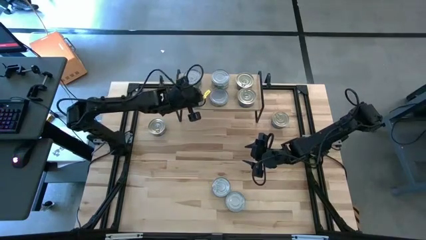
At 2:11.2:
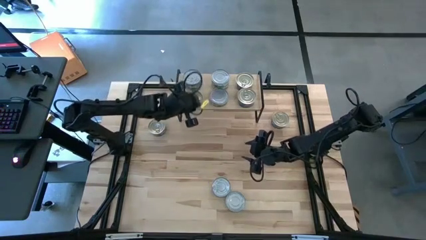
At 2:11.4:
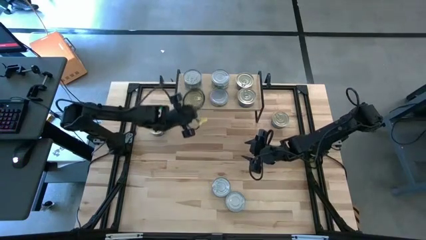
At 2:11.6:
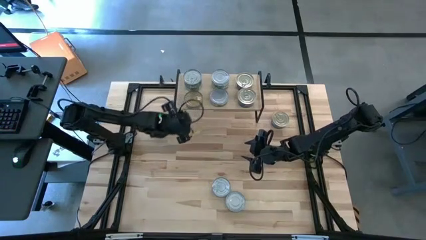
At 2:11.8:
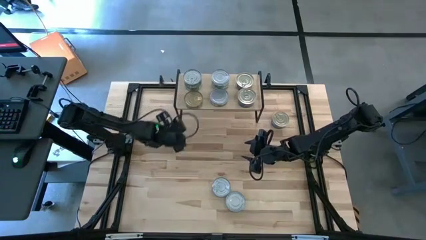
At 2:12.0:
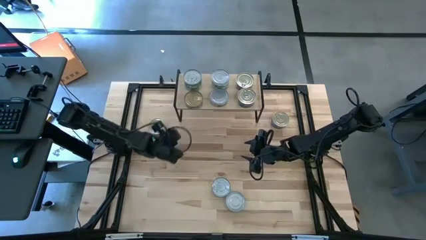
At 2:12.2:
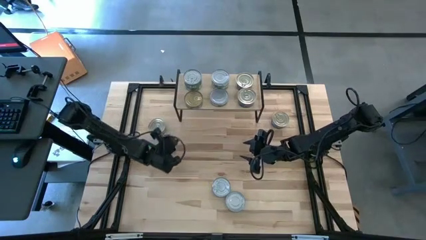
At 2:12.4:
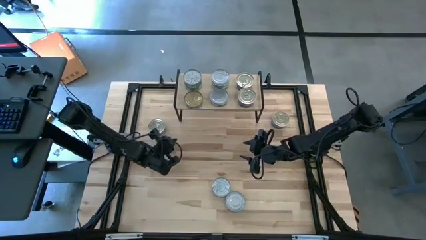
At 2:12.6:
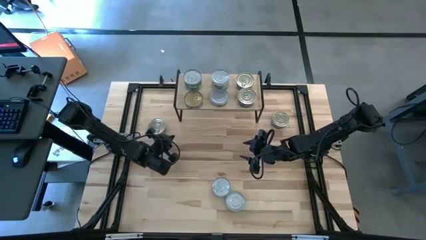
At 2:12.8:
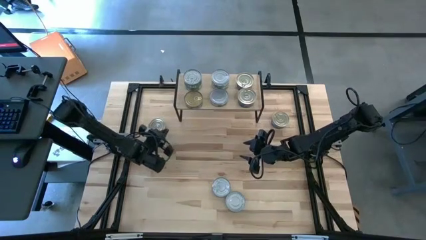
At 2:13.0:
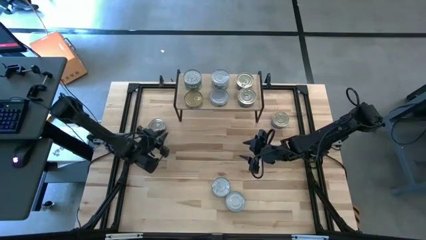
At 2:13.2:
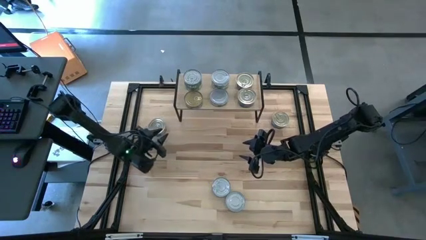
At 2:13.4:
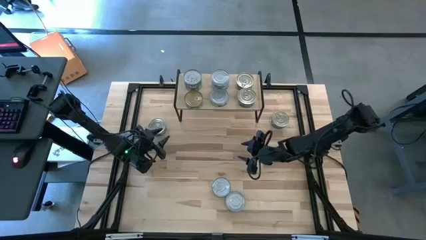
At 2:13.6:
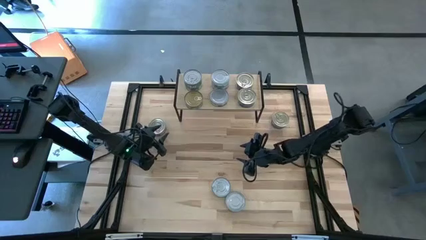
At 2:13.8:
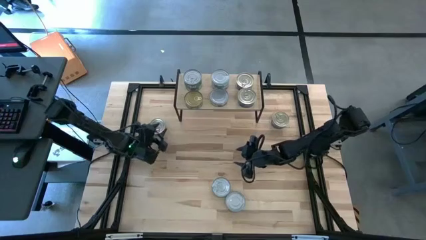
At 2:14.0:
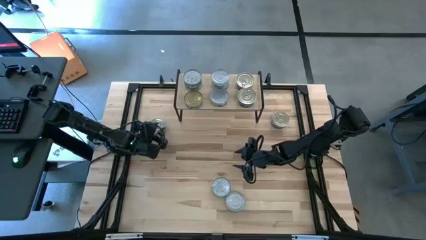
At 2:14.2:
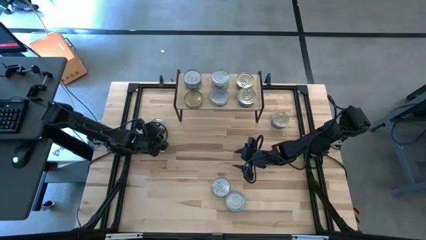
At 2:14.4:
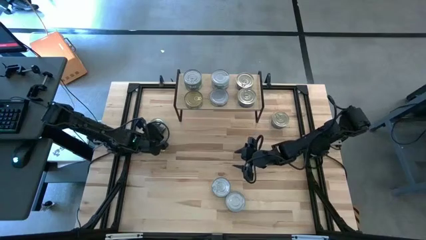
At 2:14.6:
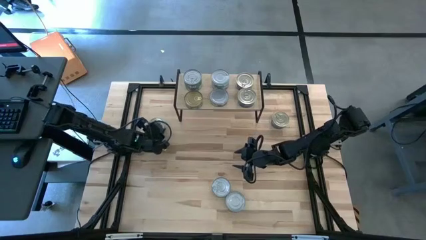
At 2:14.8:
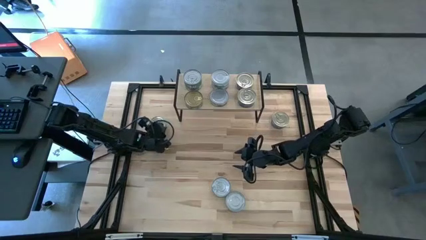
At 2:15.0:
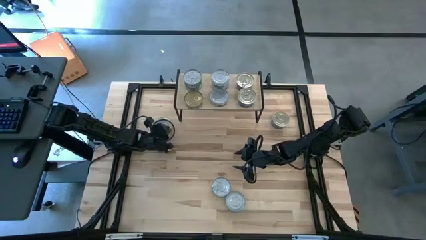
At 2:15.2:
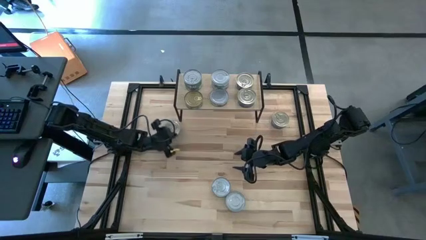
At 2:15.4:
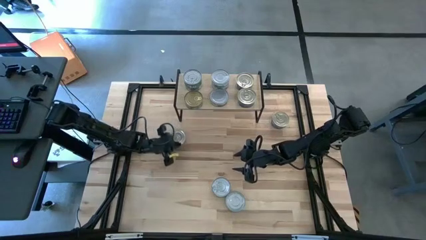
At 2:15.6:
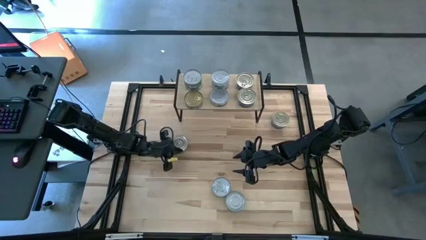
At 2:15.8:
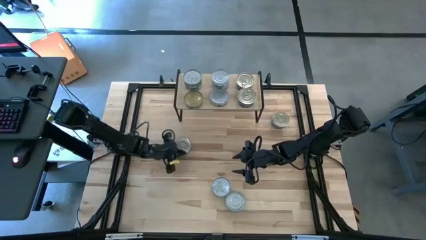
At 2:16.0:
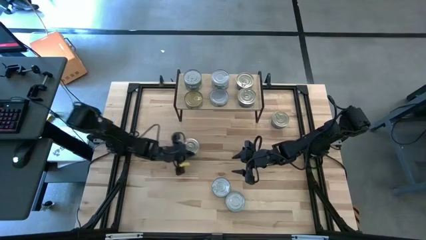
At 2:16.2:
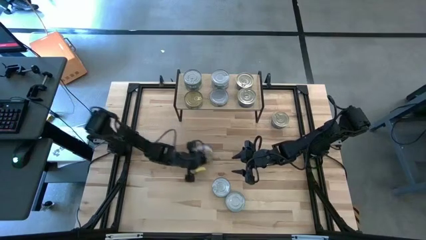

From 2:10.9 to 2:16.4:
Task: Stack canned seafood by type on shelf
Stack the left blue tuna can on top of the top blue tuna can on the shelf

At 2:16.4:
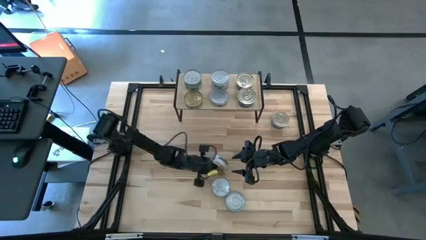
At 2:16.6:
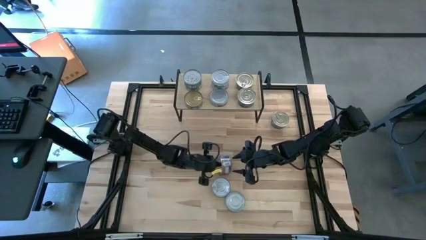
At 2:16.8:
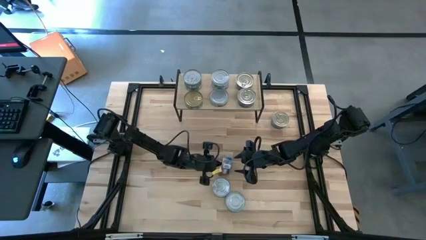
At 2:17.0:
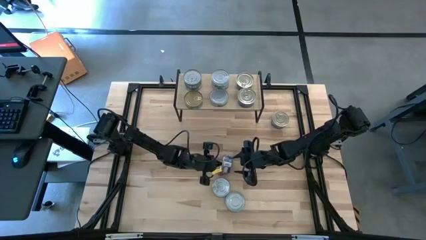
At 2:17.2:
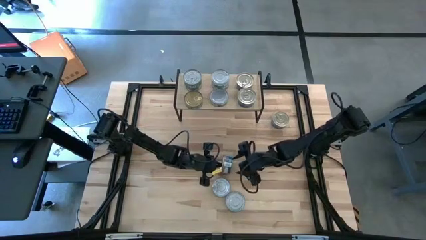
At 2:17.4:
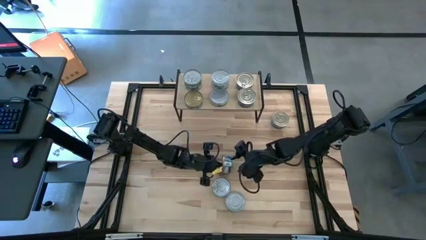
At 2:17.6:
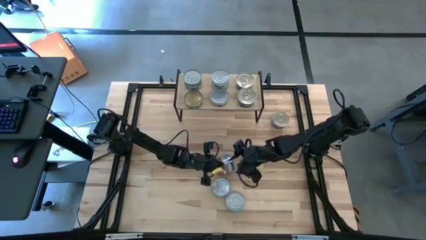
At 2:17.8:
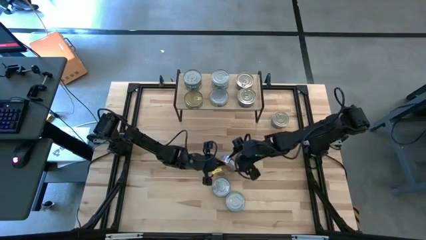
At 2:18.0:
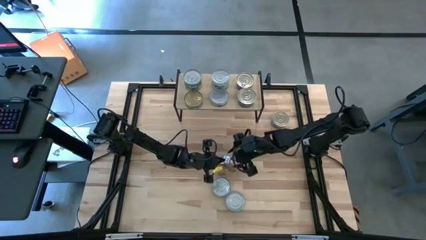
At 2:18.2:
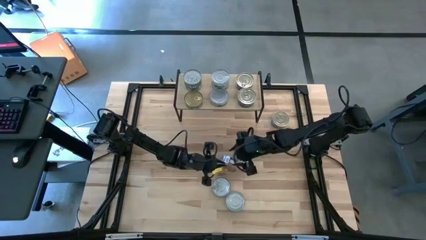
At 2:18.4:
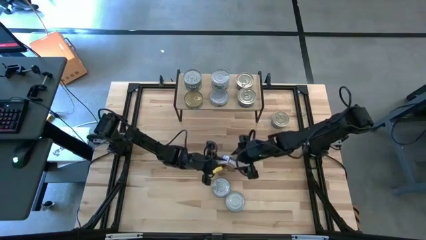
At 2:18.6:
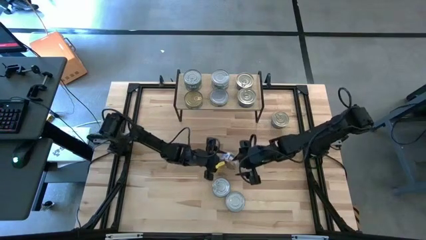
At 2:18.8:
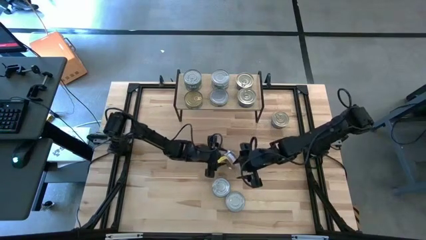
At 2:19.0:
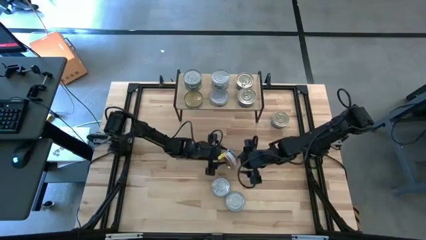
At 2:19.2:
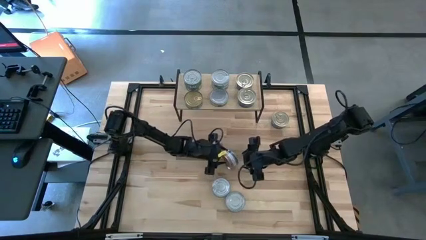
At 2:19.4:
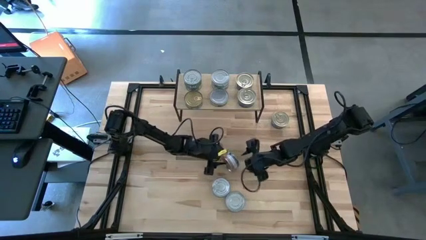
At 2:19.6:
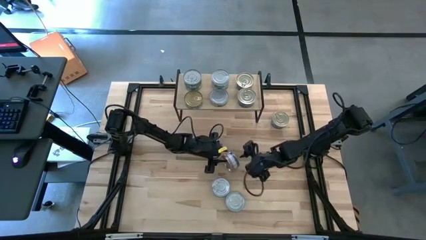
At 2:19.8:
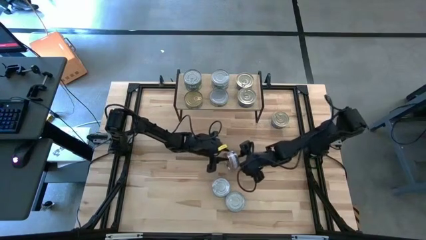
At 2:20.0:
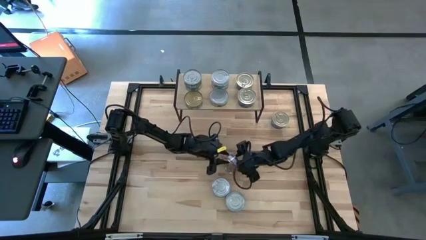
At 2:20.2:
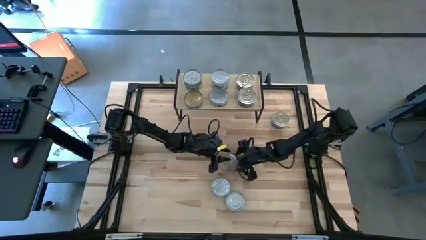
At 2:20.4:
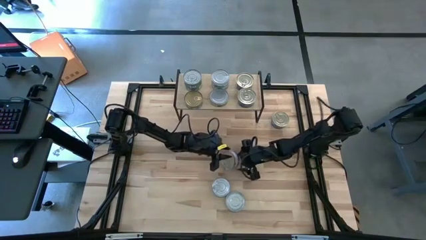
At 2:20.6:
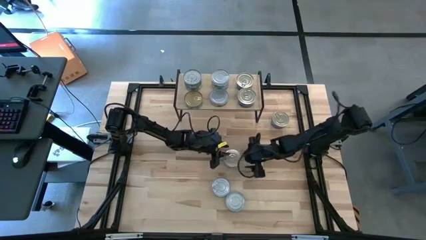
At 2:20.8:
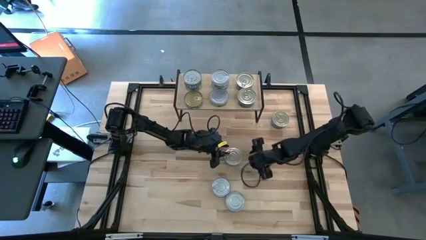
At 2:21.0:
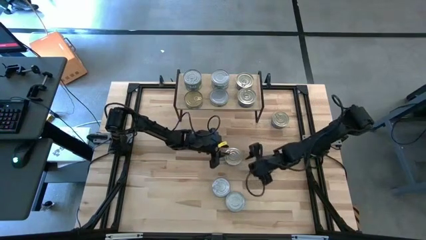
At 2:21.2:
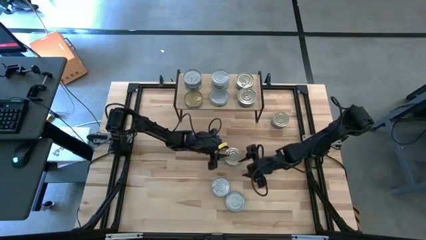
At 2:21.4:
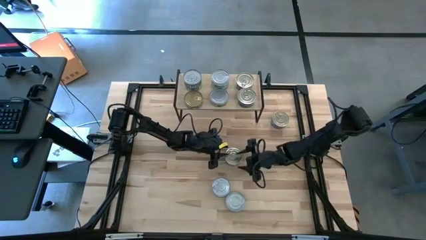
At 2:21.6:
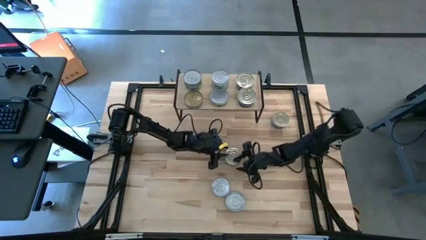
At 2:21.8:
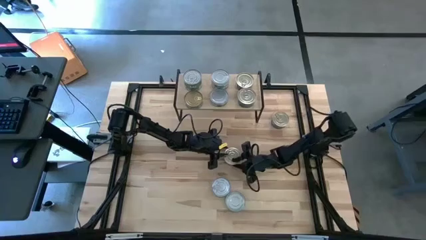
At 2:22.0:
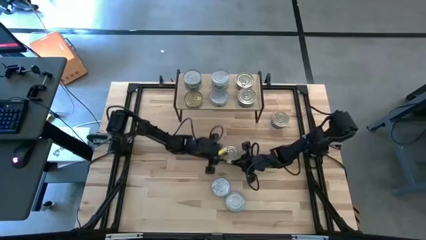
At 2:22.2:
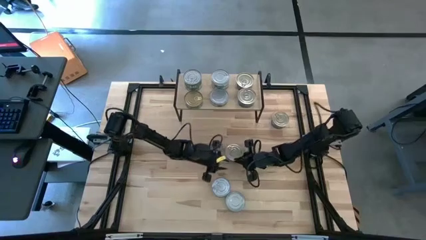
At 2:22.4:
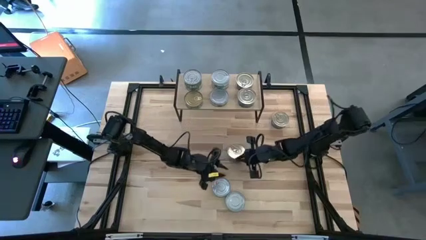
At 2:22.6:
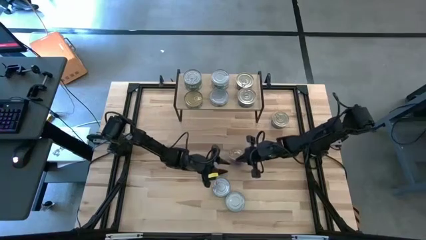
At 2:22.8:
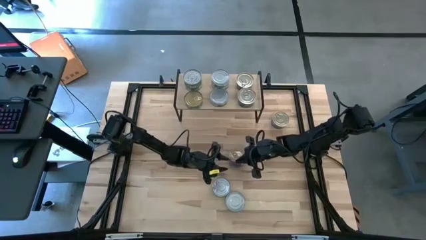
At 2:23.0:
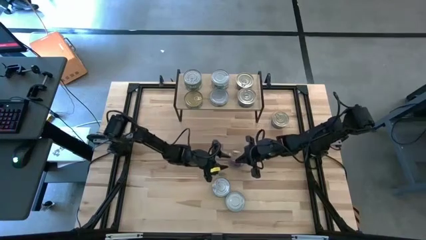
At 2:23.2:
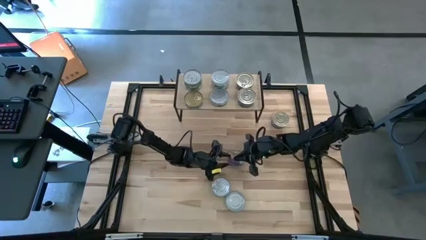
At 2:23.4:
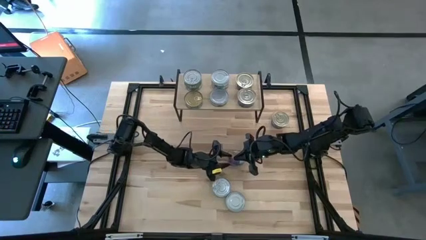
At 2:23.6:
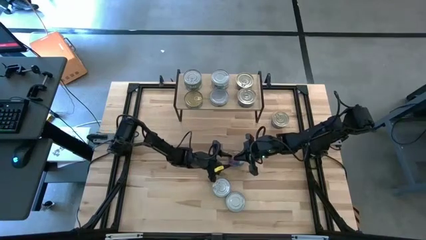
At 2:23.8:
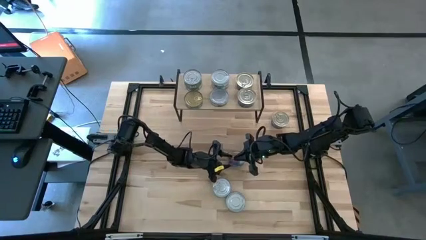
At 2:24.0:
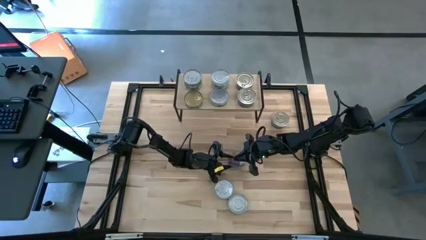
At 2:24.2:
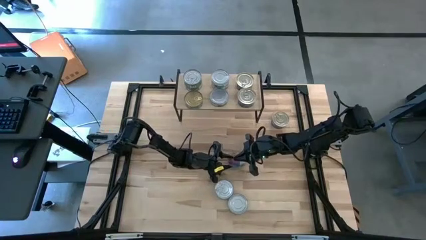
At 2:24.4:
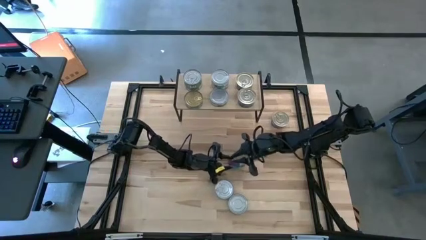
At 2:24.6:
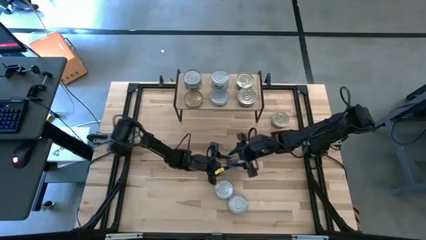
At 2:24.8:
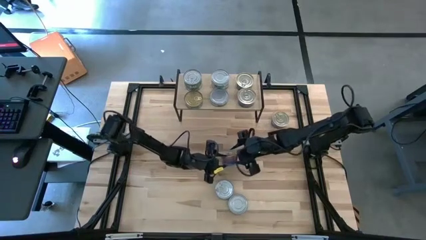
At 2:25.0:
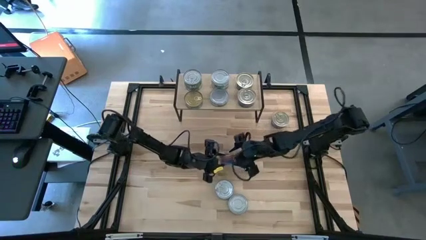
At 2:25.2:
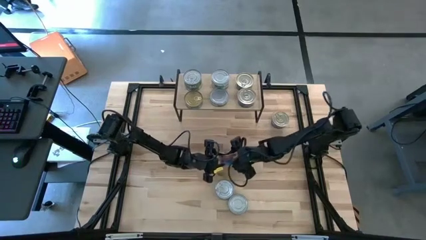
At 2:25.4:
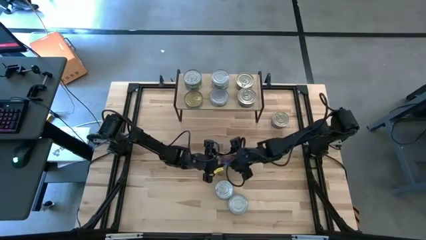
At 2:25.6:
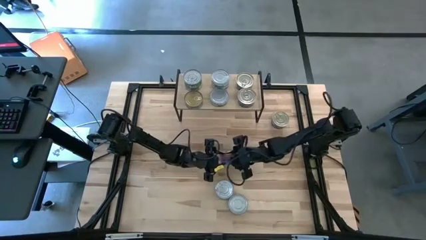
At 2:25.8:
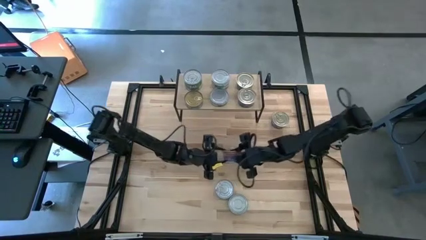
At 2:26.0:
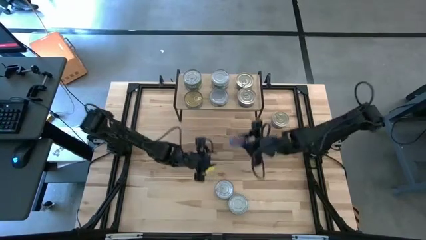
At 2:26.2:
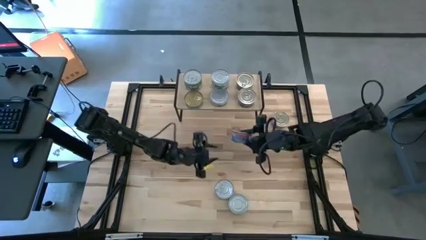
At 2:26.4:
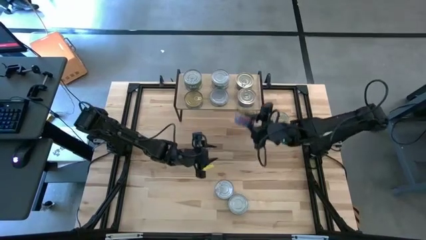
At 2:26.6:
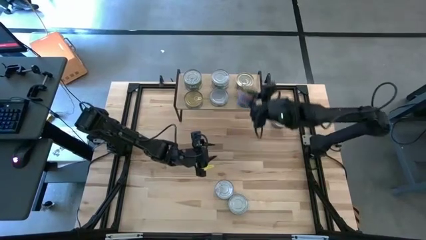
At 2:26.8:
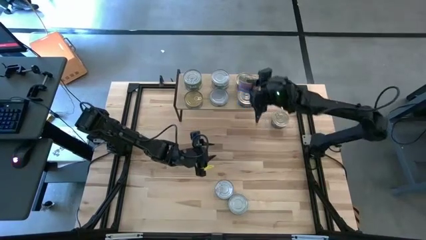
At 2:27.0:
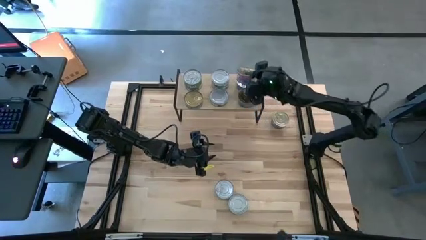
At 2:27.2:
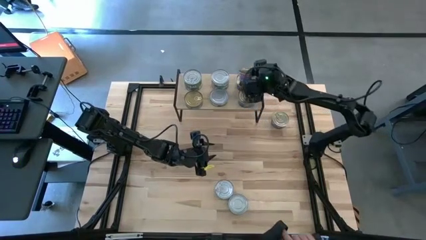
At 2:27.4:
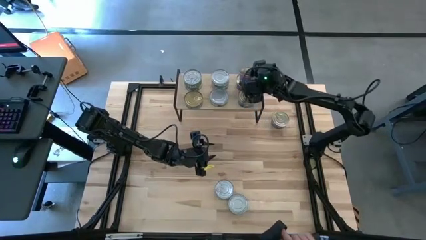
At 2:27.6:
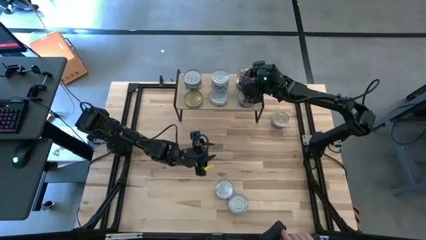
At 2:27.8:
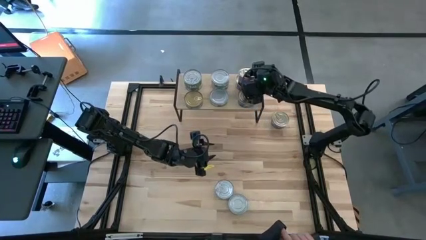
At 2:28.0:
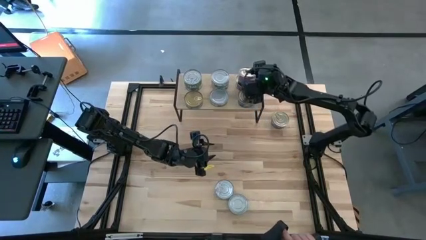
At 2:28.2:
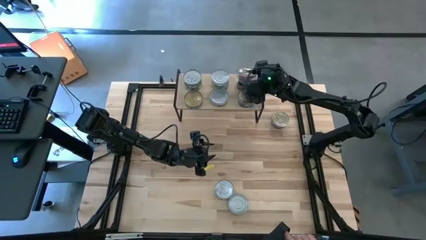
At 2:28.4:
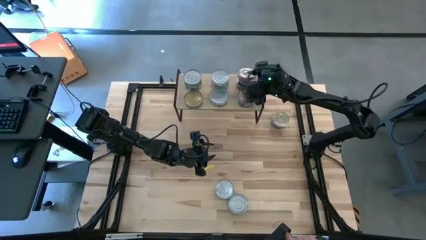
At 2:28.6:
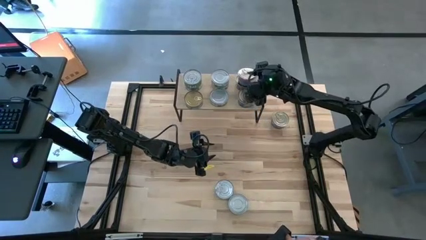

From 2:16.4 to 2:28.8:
Stack the left blue tuna can on top of the top blue tuna can on the shelf
